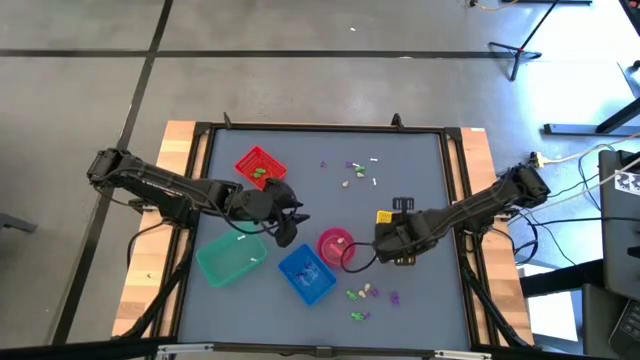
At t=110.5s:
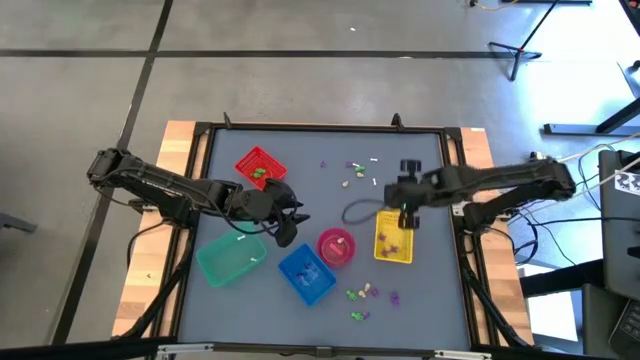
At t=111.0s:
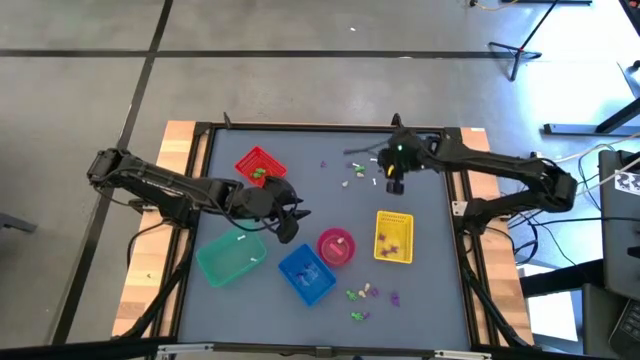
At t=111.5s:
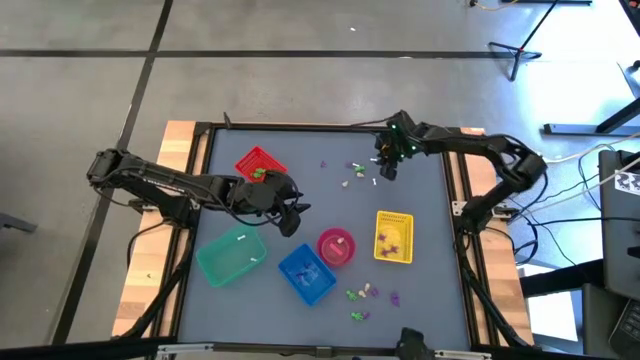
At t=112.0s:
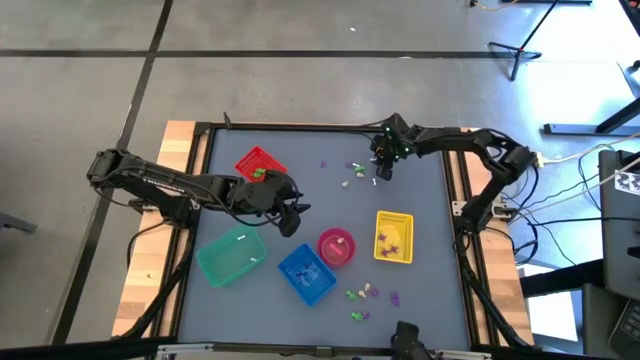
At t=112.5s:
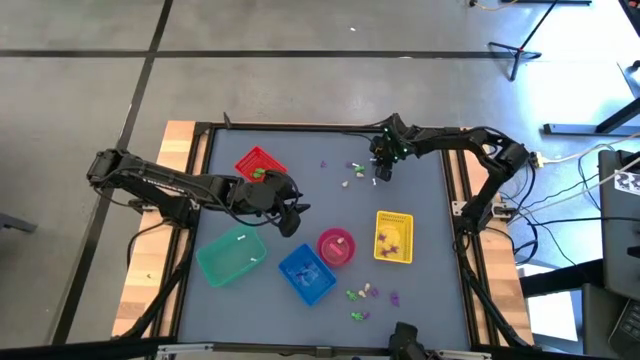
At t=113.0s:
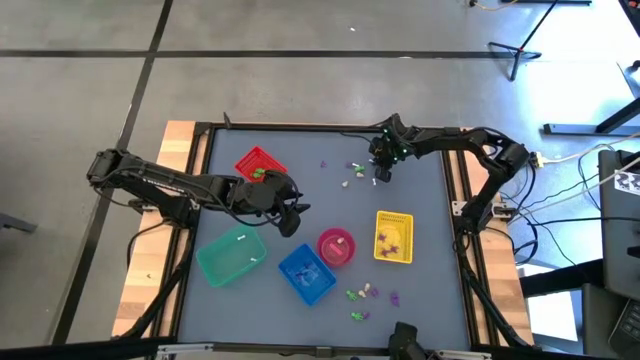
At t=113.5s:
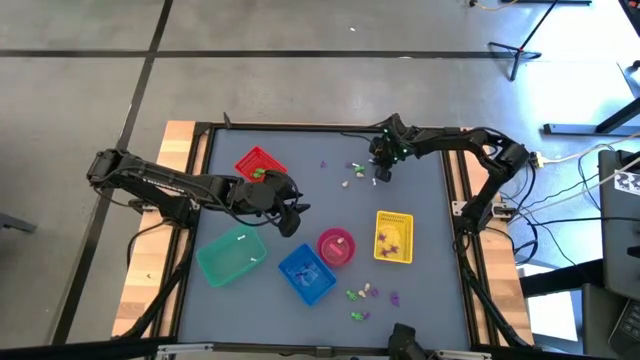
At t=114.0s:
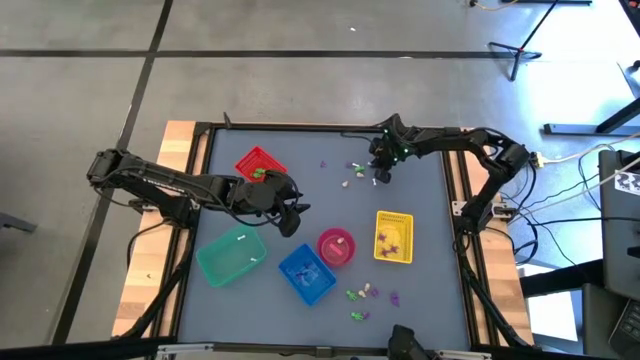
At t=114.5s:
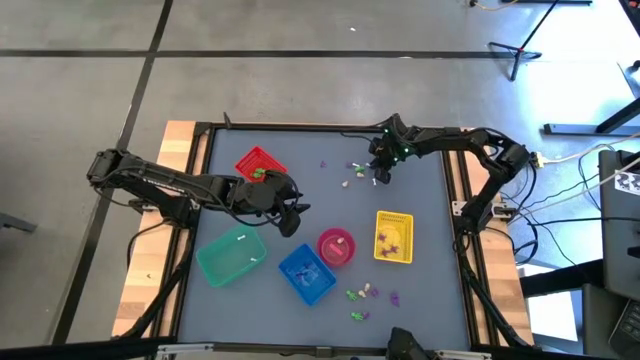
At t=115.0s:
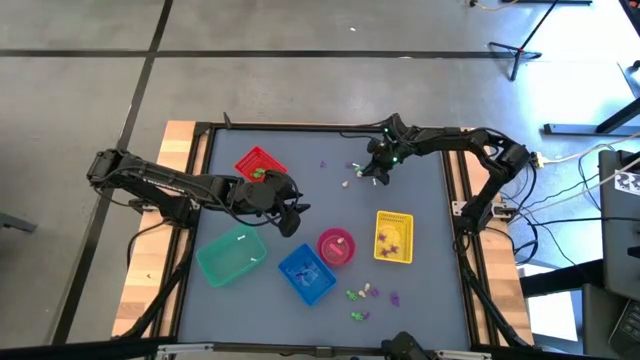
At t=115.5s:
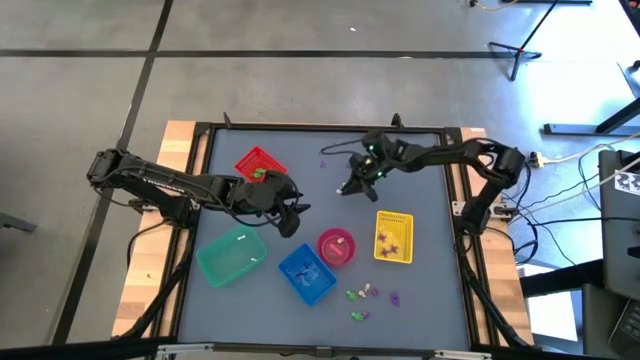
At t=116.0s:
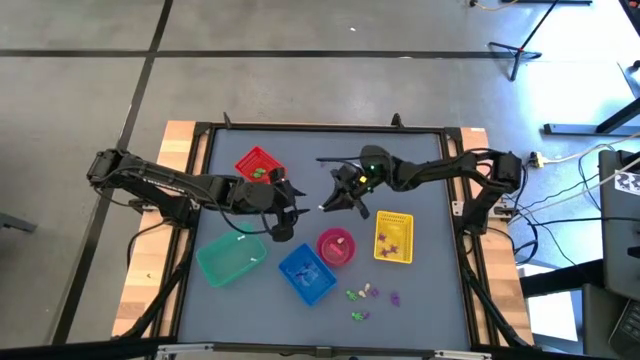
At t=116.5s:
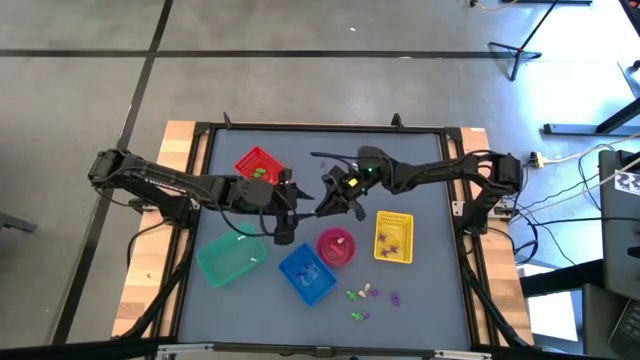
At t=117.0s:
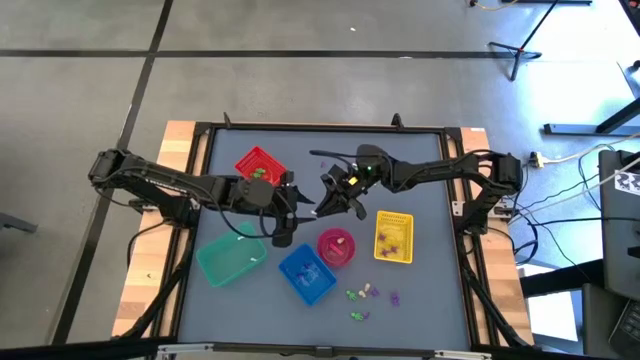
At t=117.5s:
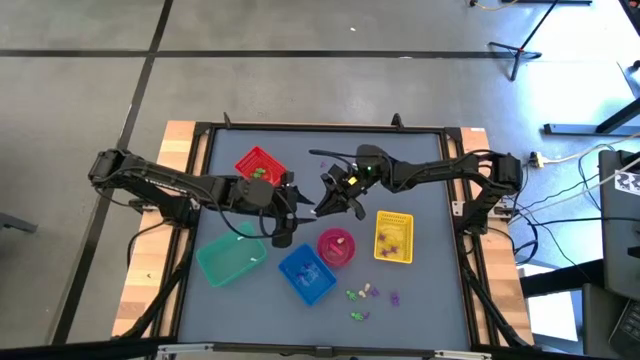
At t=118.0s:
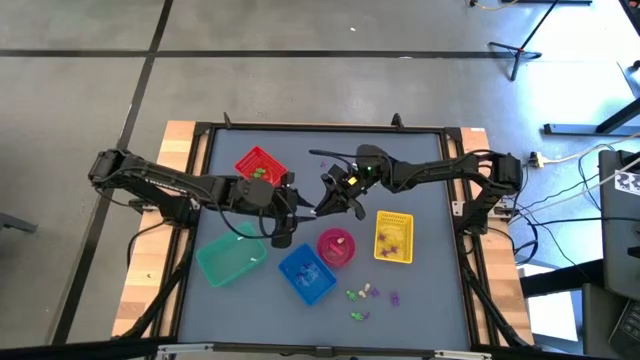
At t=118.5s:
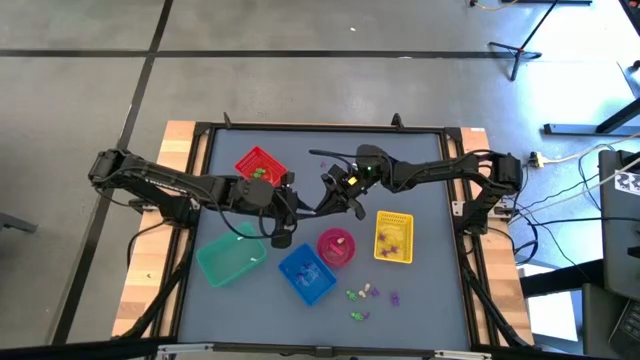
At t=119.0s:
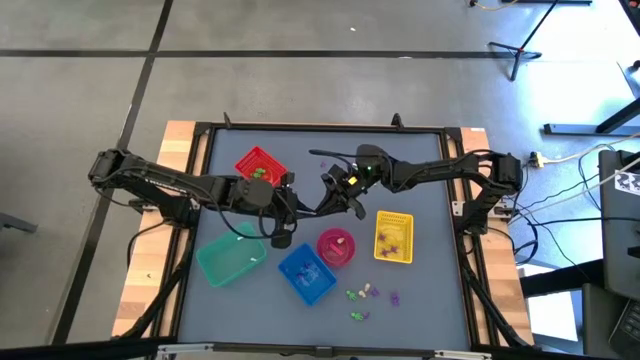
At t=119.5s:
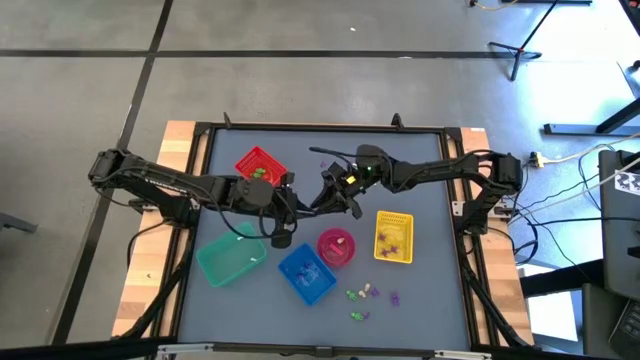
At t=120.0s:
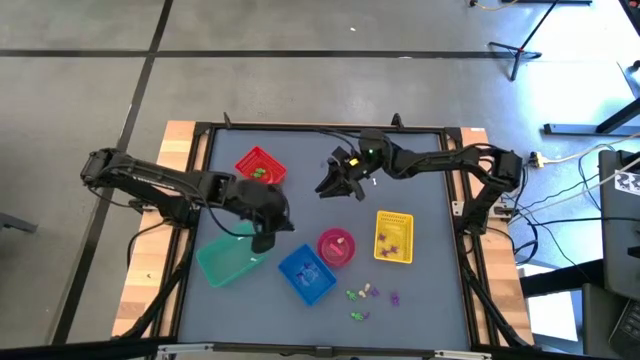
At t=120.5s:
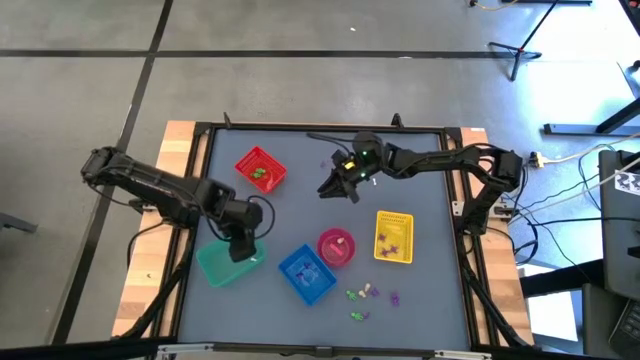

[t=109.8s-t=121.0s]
Task: Sort Halloween decoration
Put the white bone toy into the green bin

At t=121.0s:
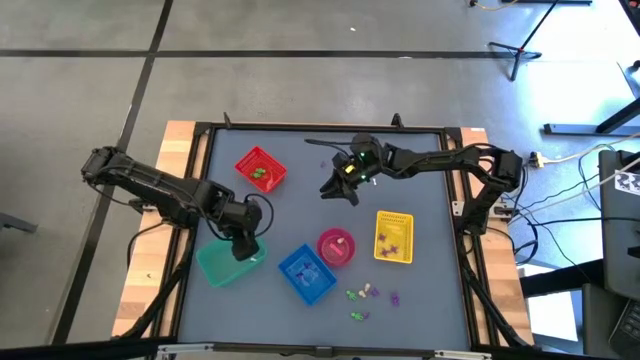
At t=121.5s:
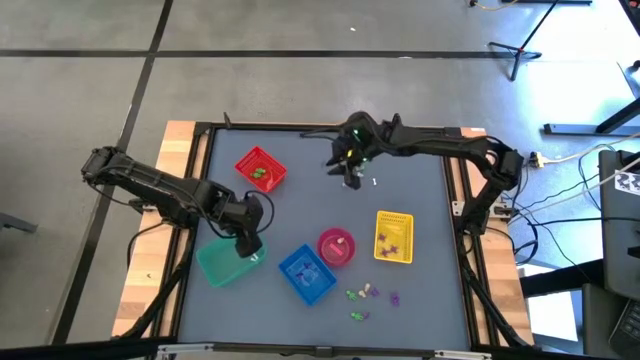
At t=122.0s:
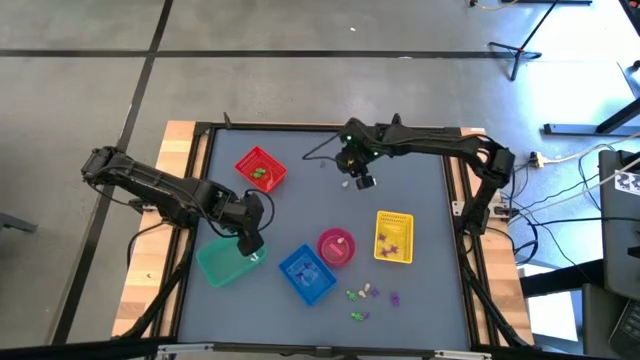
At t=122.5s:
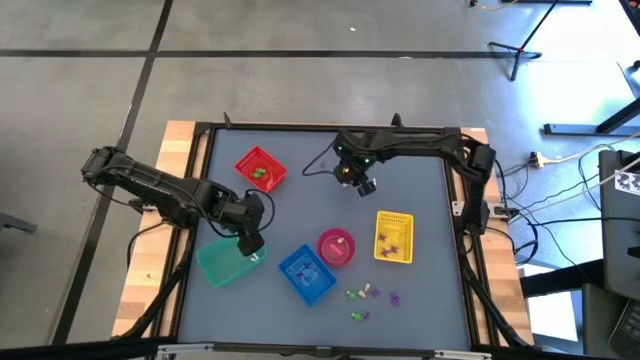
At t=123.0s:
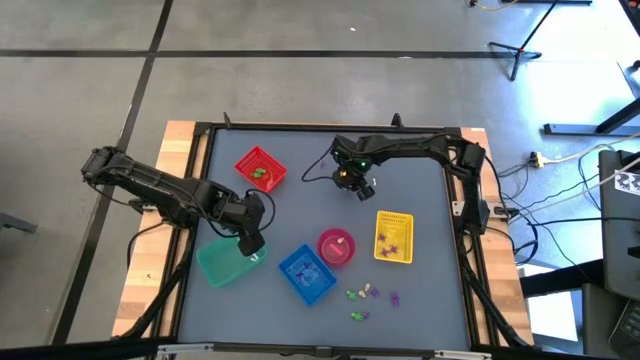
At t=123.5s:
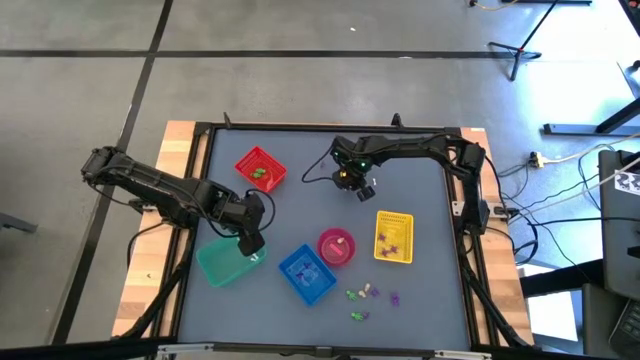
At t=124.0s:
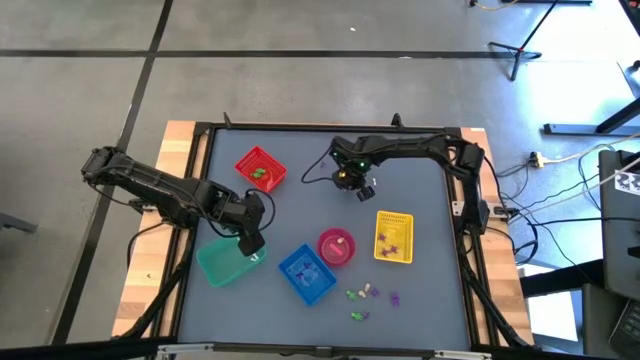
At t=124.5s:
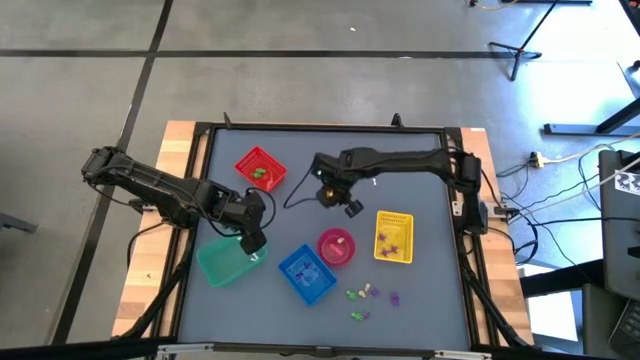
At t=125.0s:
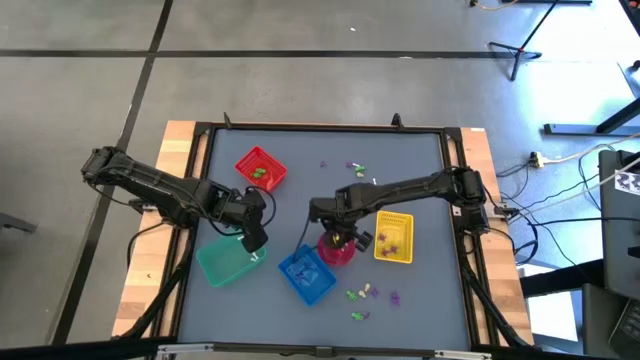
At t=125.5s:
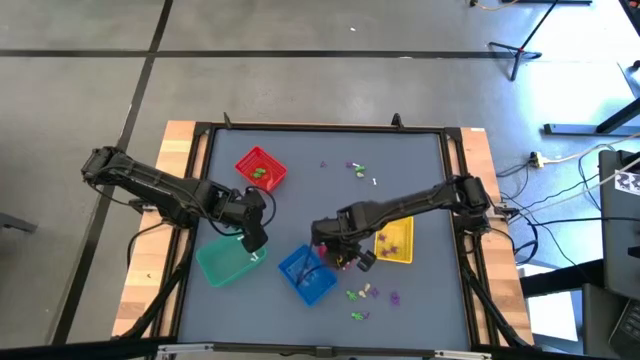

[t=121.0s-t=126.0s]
Put the white skull toy into the pink bin

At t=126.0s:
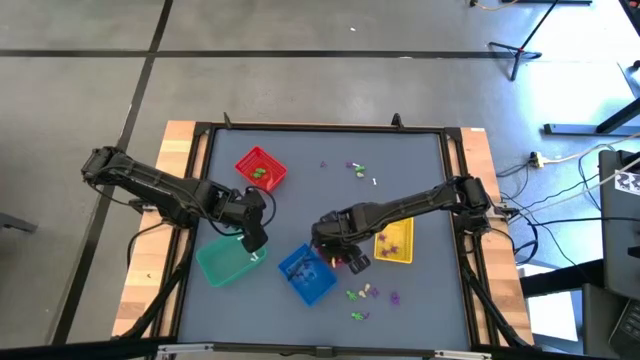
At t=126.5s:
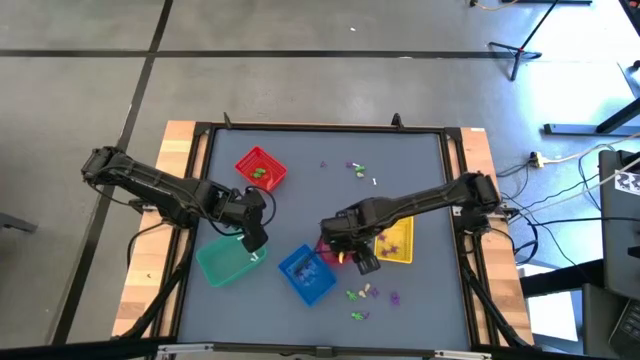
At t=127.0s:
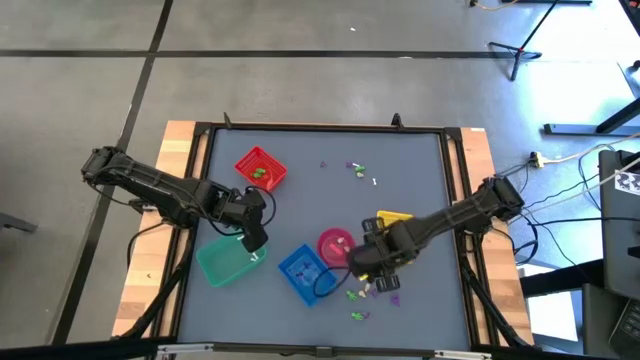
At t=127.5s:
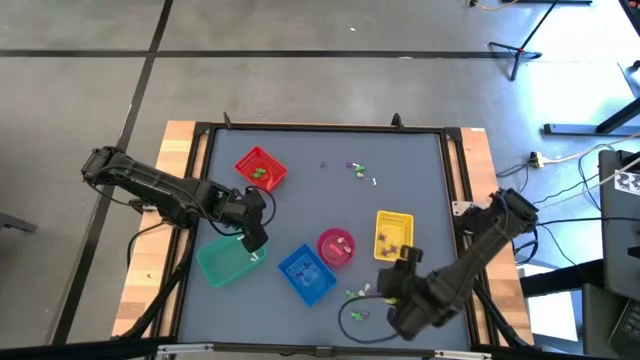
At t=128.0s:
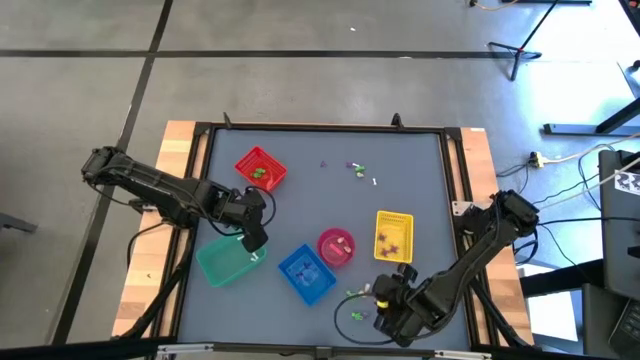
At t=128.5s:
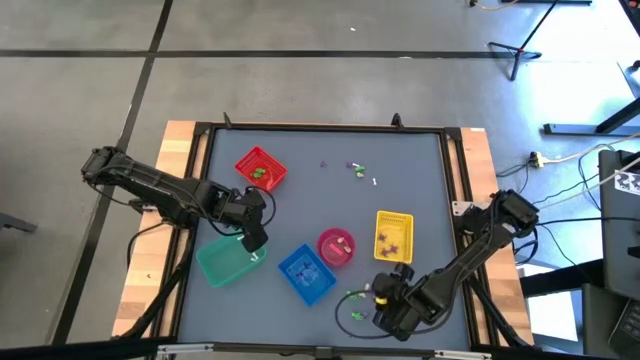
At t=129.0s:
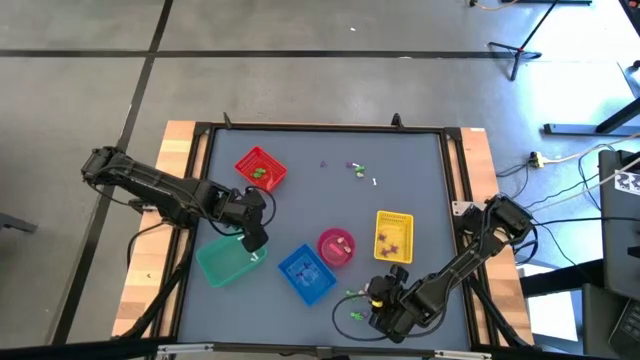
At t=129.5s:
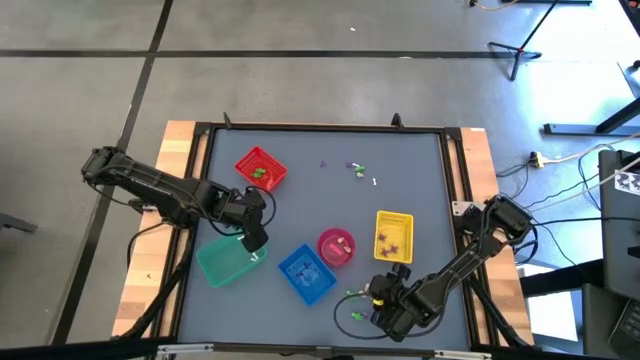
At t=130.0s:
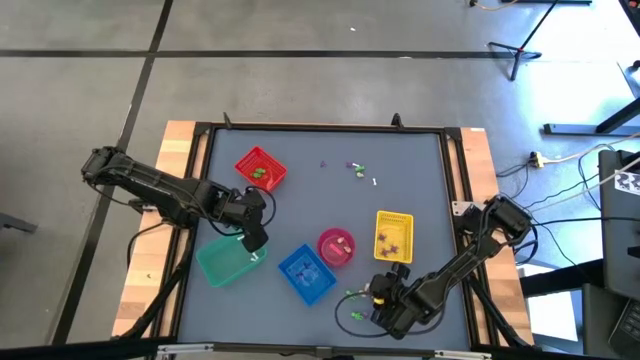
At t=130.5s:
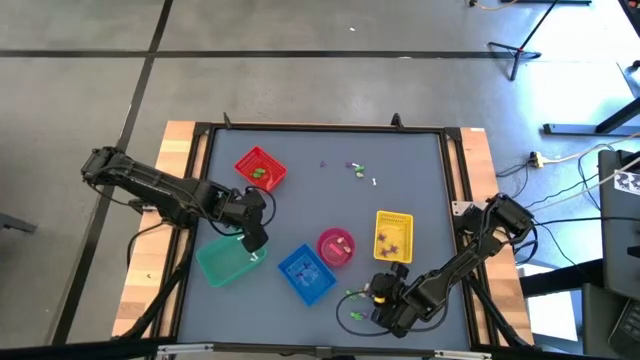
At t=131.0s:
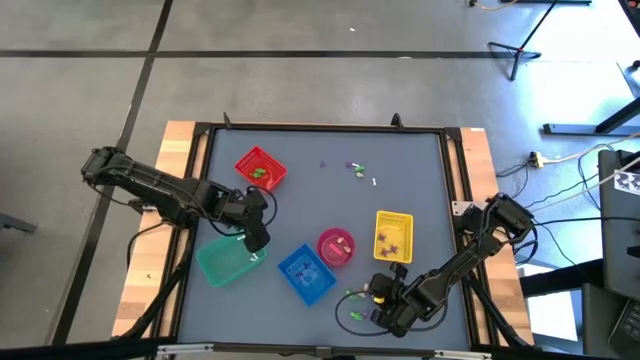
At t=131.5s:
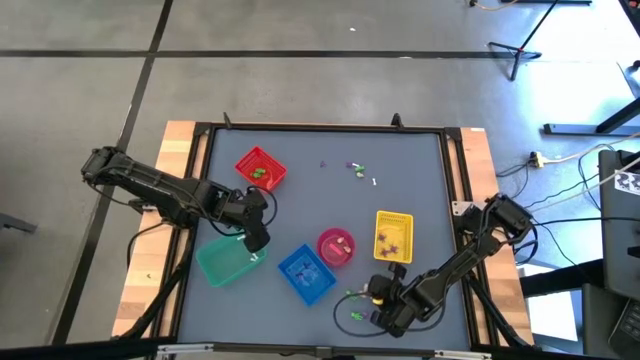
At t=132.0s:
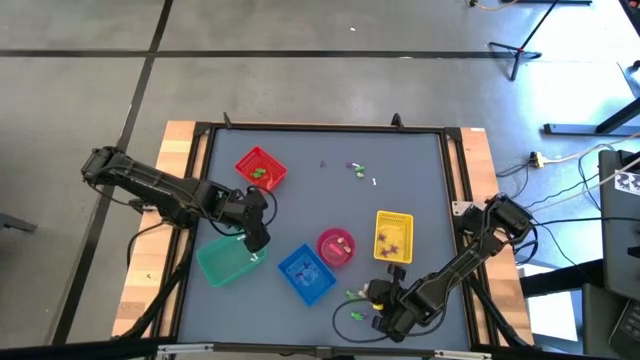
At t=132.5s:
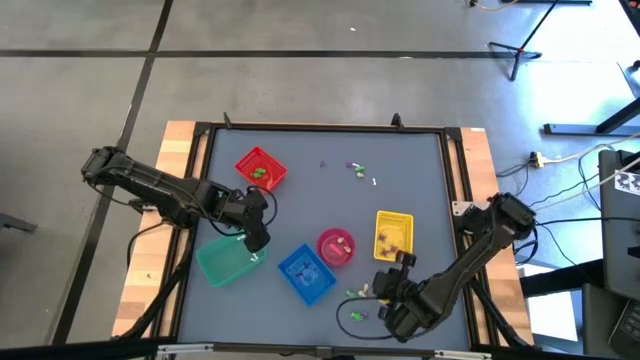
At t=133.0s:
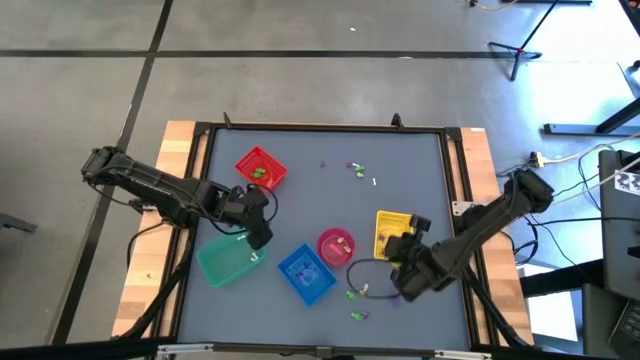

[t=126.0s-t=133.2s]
Put the violet spider toy into the yellow bin
